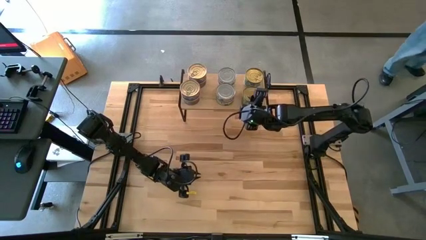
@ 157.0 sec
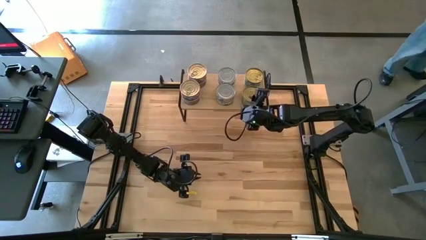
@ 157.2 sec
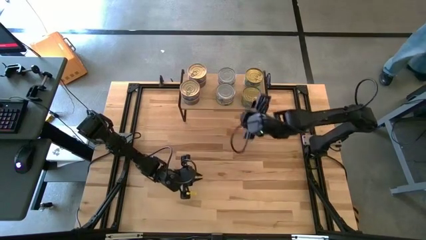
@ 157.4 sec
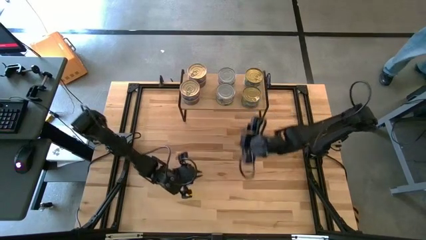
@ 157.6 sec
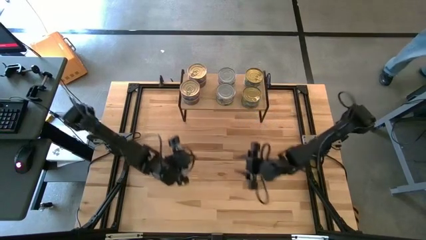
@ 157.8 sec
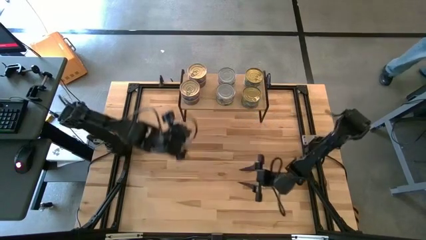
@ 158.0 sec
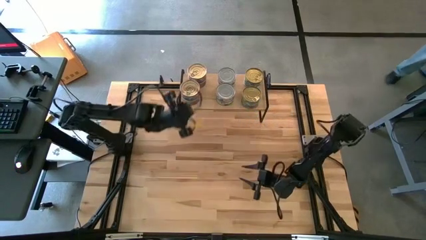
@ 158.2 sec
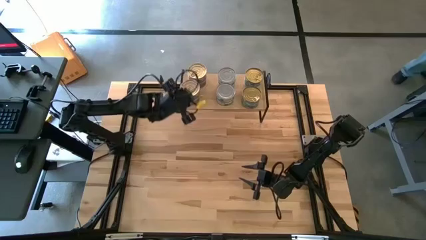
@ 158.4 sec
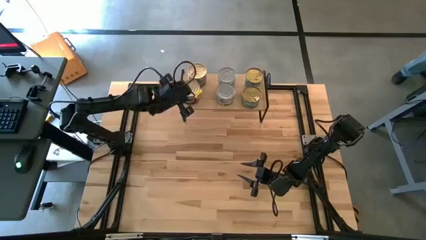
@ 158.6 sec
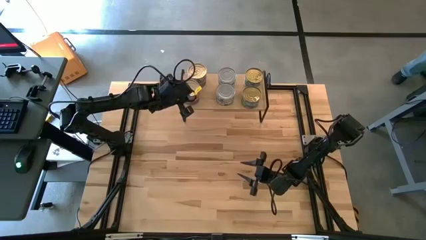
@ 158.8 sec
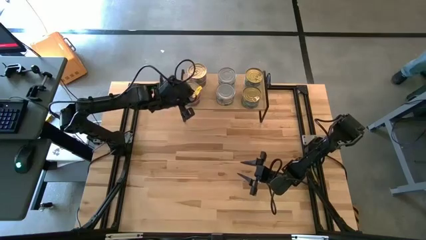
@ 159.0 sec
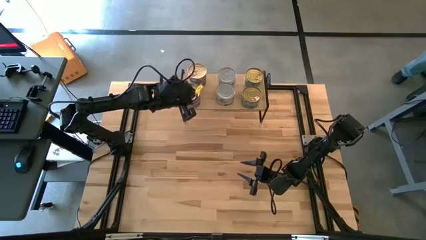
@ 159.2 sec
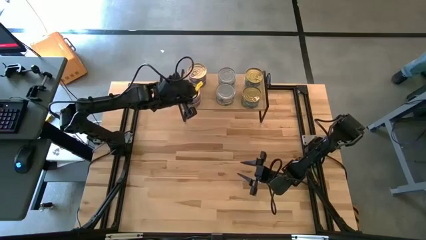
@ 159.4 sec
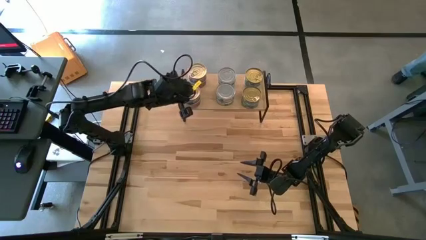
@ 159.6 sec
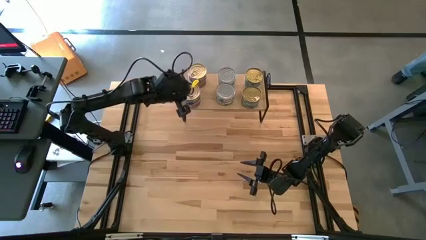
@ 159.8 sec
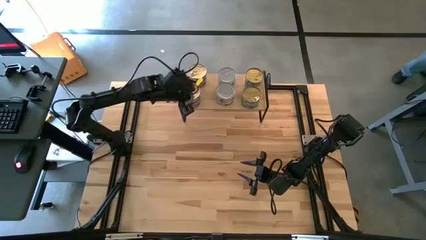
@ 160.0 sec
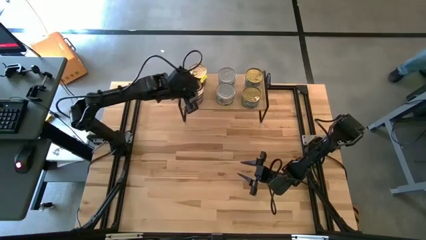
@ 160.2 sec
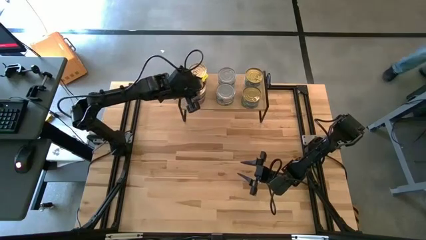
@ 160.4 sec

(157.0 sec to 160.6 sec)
Task: Stack canned seafood by type on shelf
Adjust the stacked blue pink tuna cans on the shelf

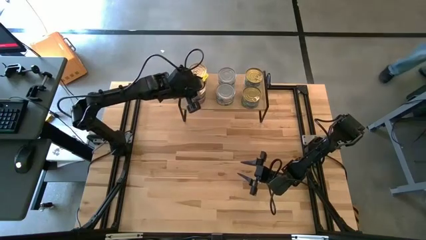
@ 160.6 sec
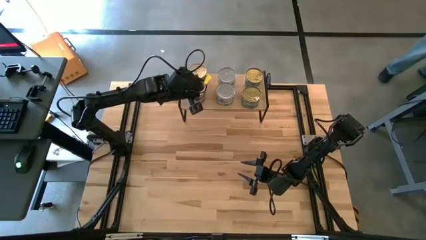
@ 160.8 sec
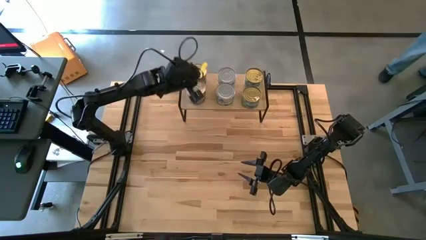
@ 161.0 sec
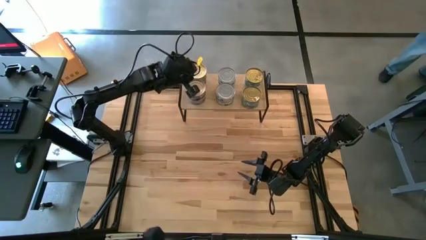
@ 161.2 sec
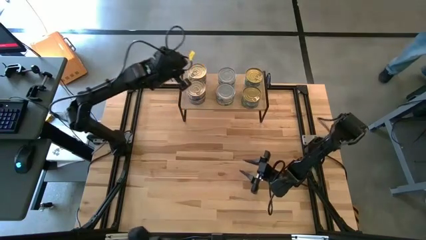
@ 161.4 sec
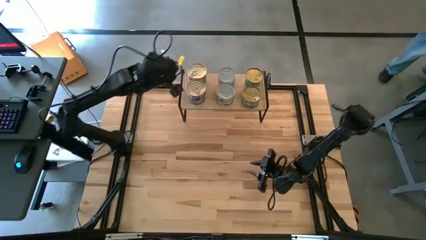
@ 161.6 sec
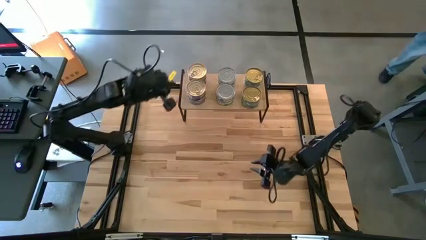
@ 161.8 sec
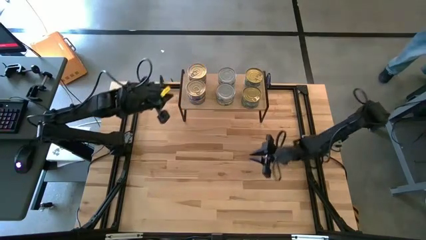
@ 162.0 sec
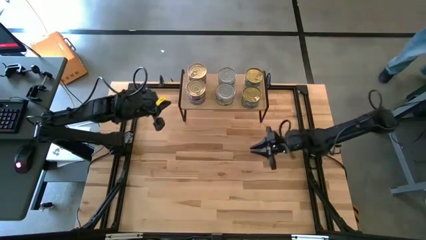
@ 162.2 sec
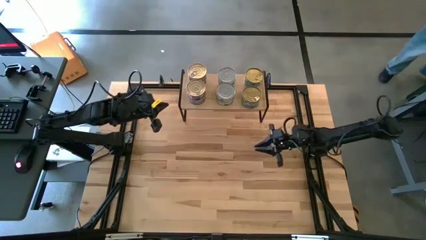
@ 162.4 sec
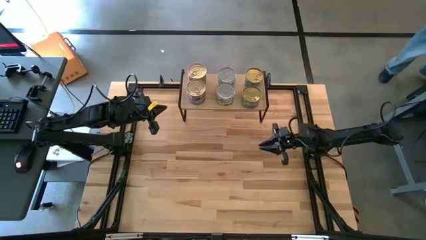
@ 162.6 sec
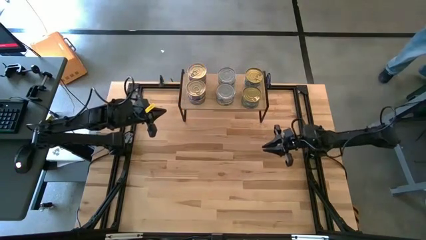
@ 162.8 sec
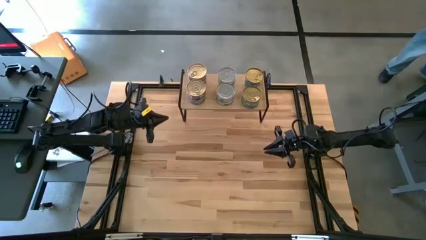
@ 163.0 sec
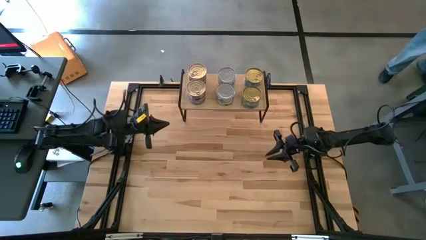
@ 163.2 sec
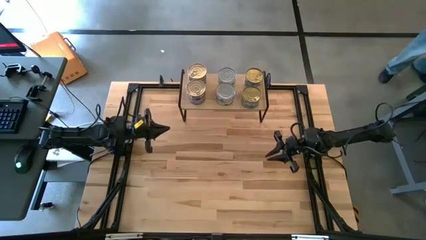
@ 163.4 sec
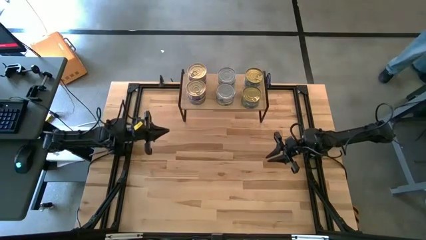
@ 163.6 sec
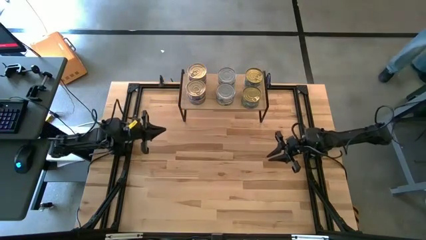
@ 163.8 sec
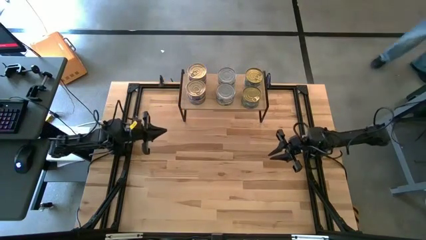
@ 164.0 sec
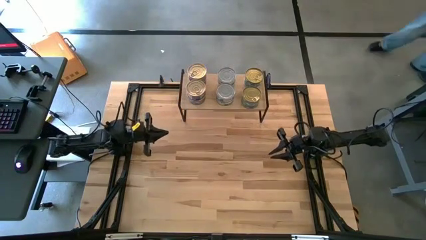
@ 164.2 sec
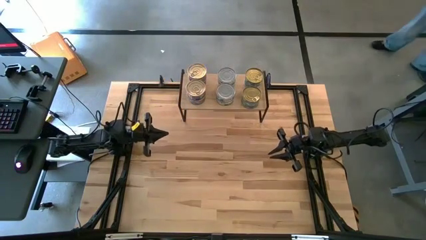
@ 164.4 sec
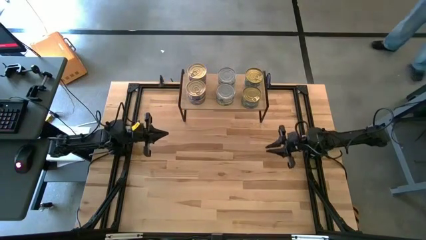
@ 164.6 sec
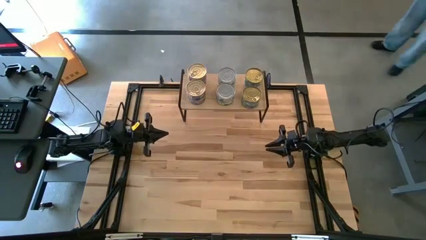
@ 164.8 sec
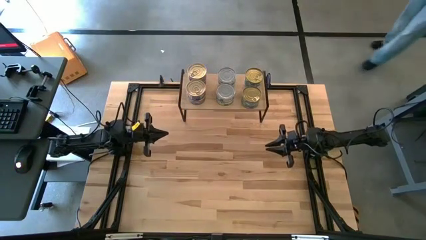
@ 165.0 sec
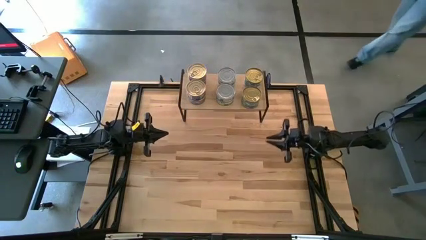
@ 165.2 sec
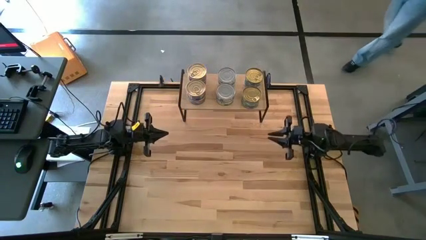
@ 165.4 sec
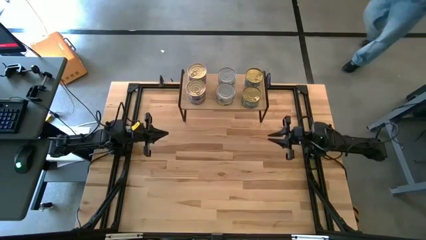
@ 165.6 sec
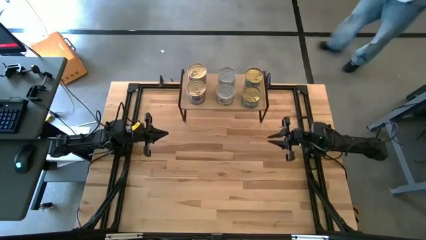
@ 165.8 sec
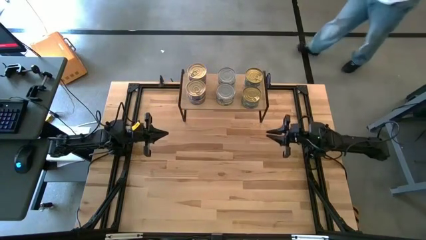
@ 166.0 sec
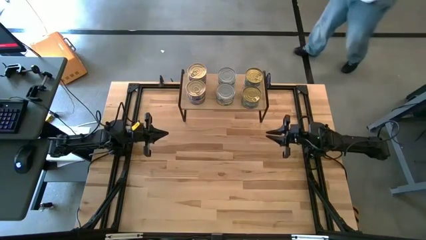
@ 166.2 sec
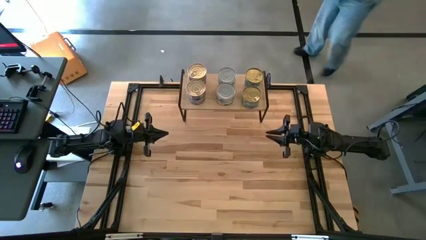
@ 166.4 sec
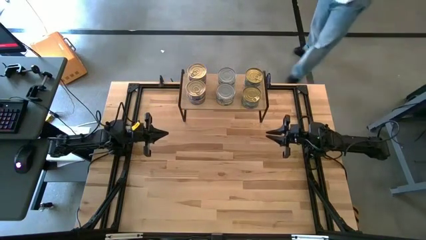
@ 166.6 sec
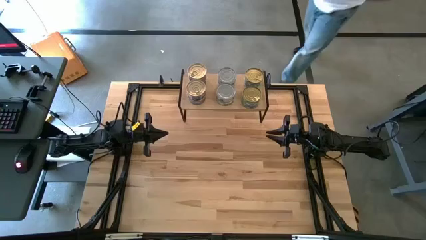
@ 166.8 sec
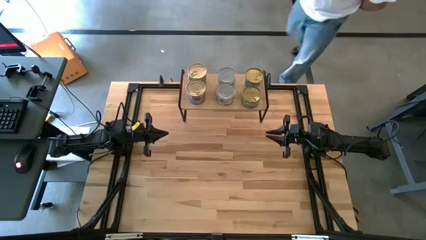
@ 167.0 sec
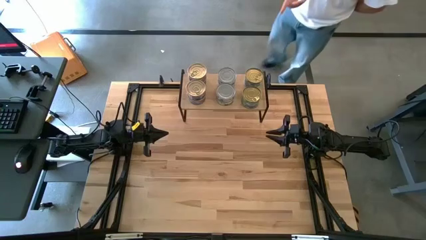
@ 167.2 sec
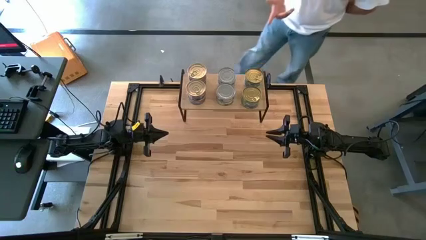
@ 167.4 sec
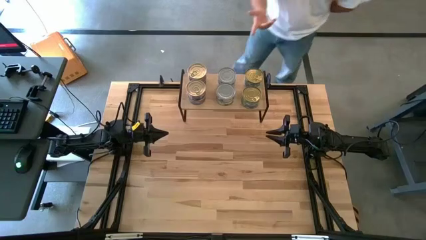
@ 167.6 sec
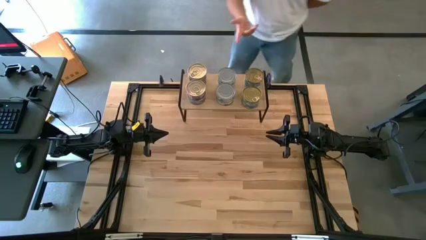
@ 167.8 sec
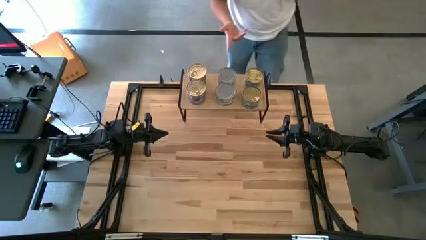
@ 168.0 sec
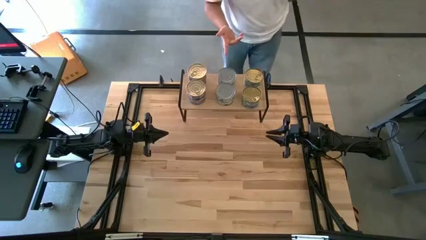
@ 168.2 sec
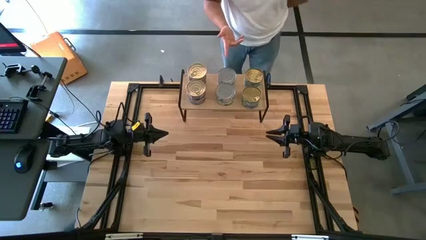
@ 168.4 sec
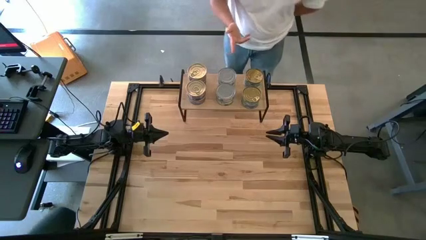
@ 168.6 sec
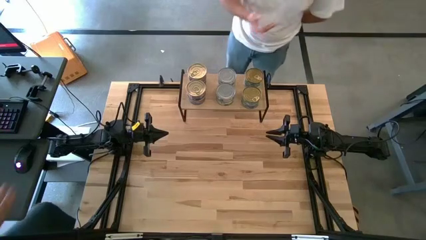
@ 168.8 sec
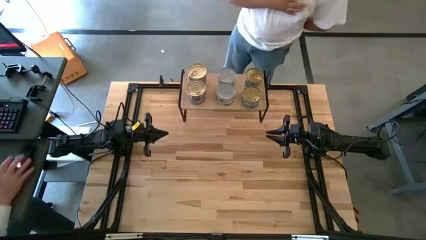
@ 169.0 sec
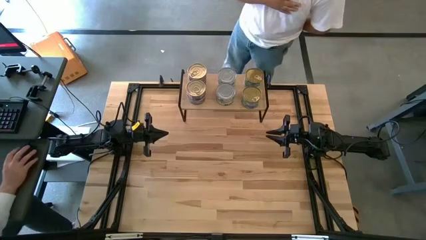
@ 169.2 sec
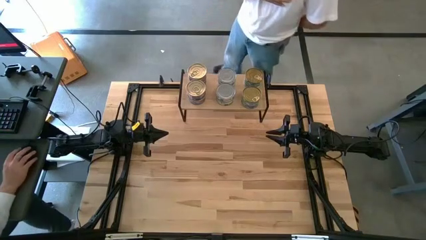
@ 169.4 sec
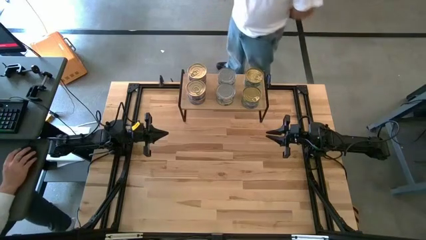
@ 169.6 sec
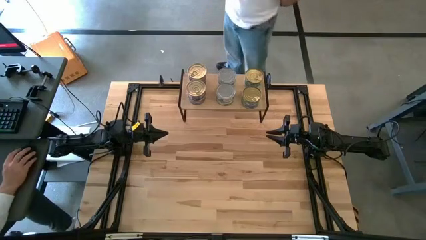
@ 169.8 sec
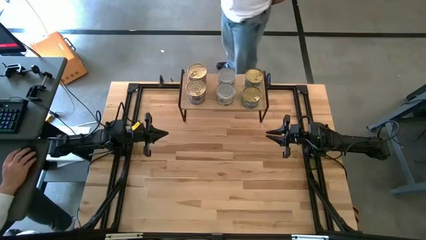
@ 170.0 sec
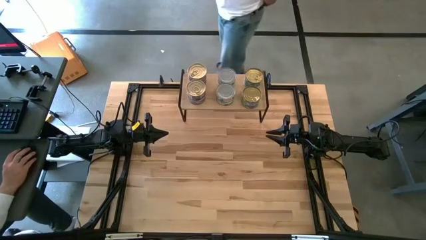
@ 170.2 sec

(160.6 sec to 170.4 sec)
Return to Home Position

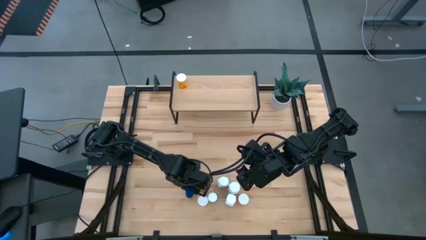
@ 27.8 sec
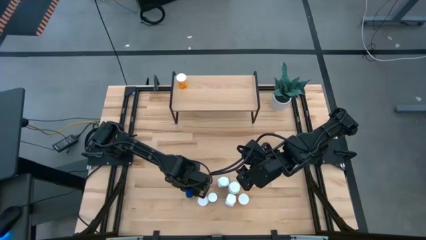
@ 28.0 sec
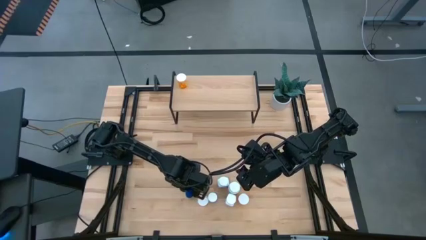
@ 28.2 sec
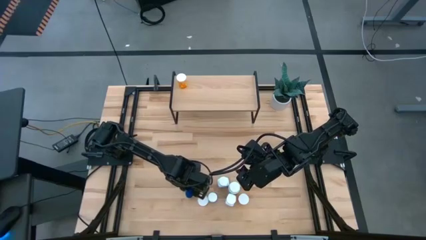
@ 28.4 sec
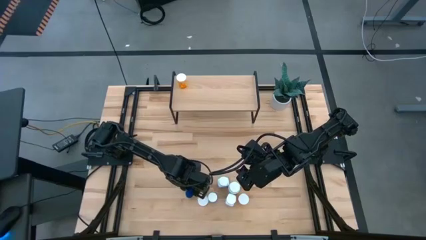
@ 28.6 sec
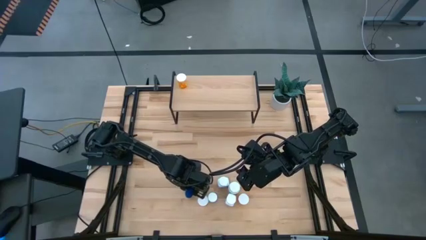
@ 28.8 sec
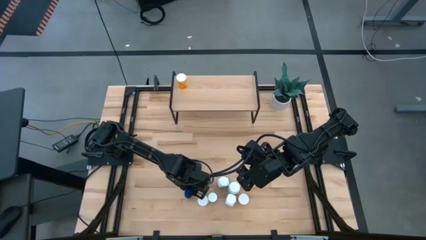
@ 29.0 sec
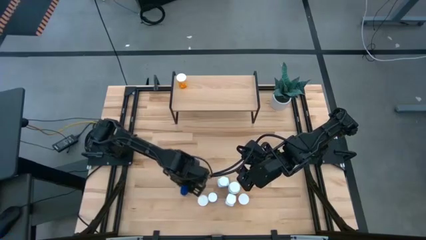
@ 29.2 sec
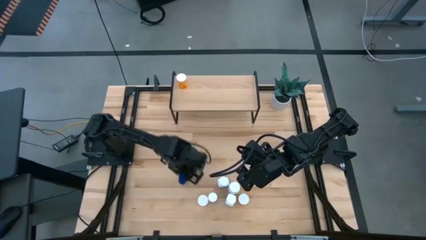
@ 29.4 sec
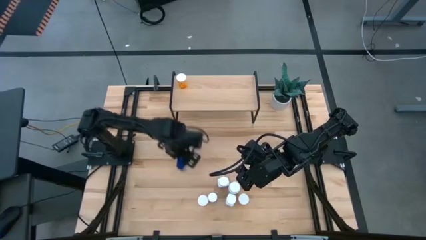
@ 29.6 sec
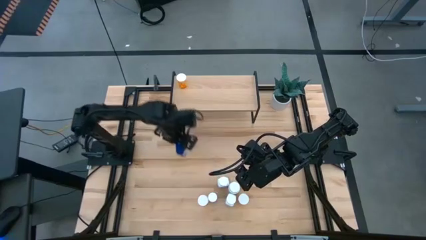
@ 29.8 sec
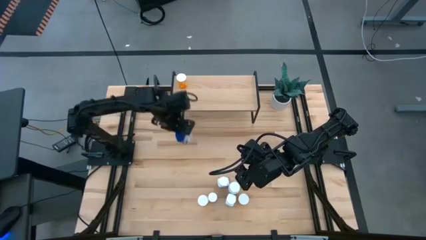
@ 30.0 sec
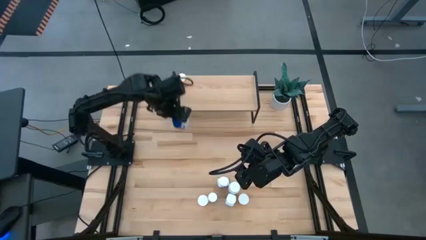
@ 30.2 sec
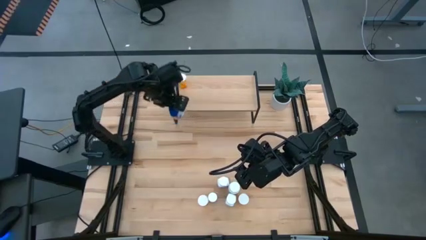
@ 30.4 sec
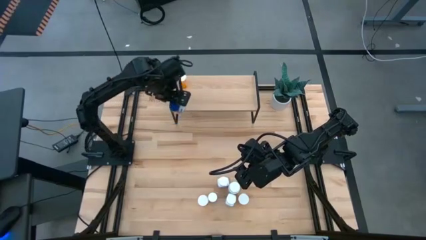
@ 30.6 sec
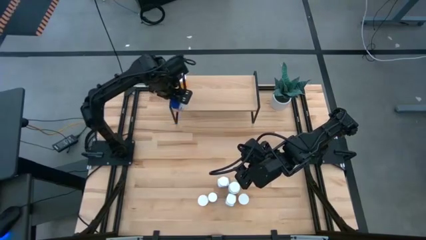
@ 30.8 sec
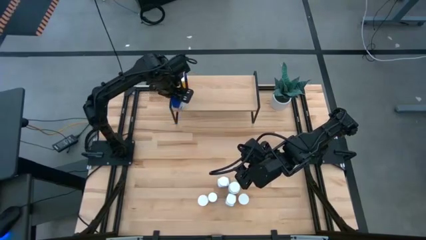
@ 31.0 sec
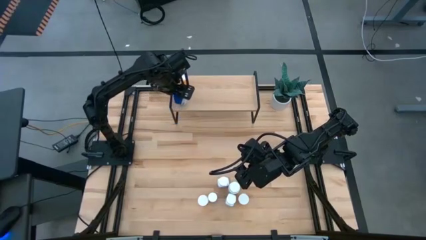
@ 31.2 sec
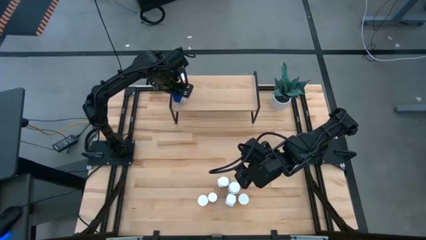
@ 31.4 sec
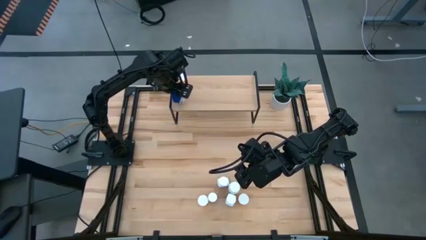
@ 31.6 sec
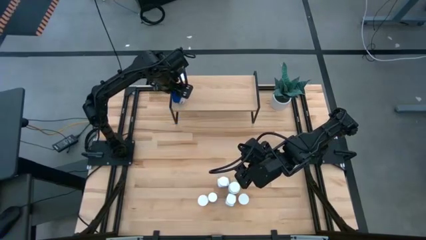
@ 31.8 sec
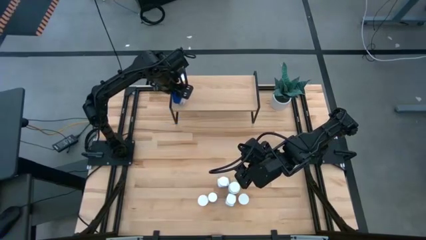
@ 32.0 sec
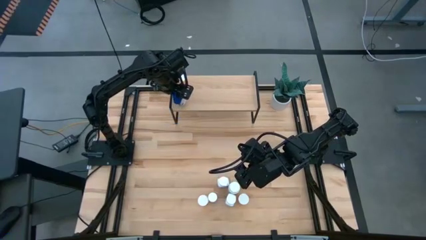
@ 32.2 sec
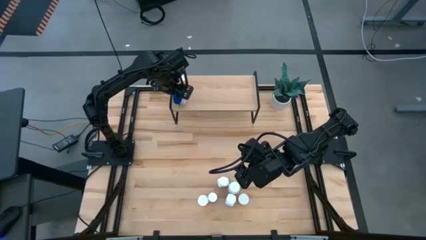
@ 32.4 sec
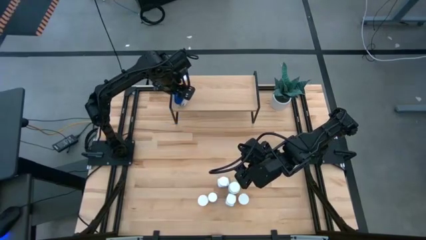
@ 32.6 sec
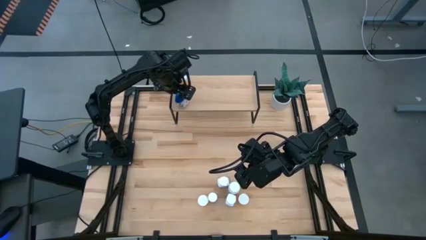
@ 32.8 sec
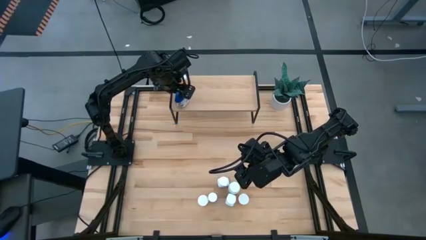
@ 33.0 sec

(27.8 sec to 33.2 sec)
Task: Pick and place medicine bottles onto shelf by color
Put the blue bottle on the shelf
